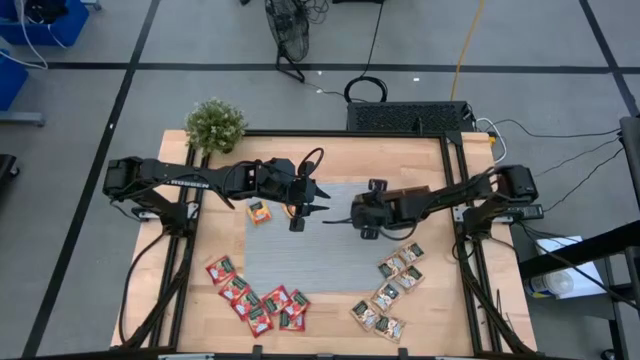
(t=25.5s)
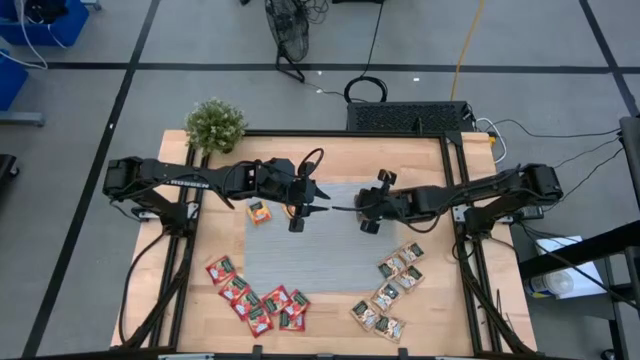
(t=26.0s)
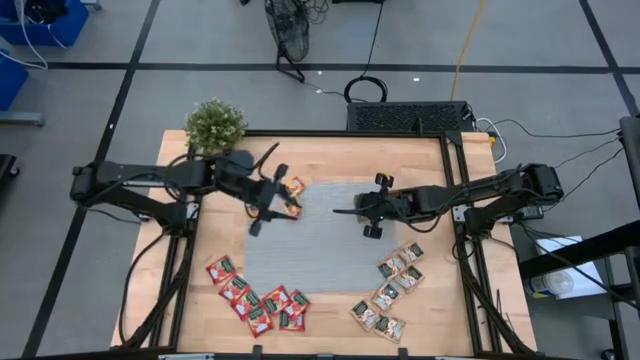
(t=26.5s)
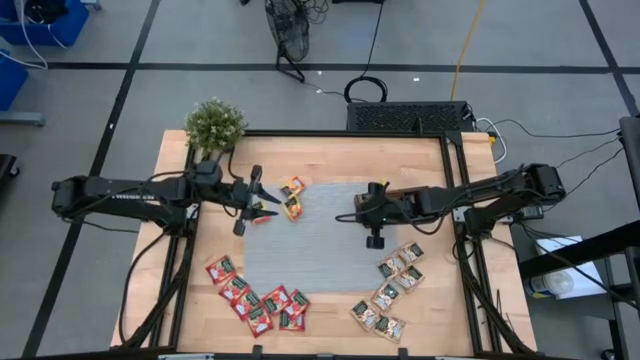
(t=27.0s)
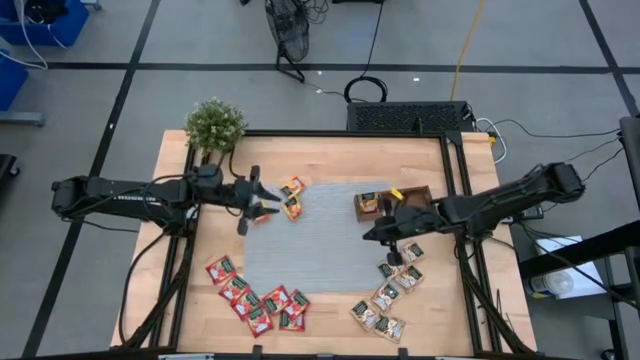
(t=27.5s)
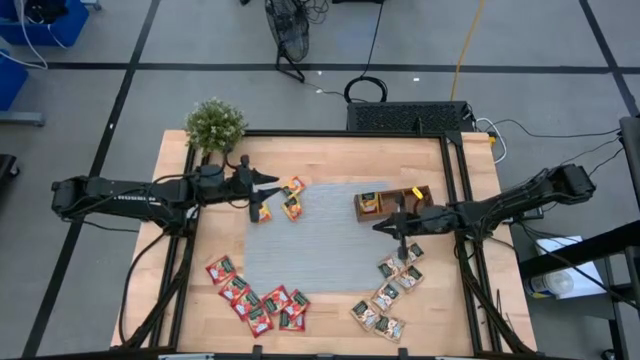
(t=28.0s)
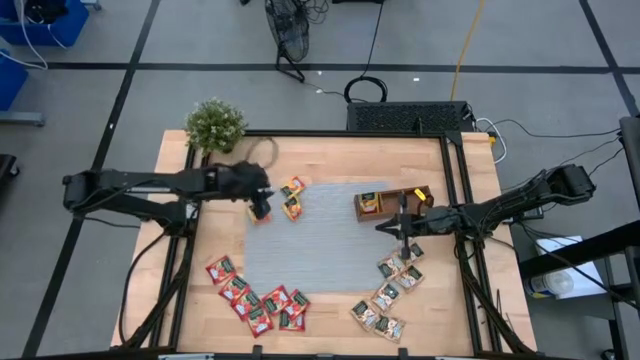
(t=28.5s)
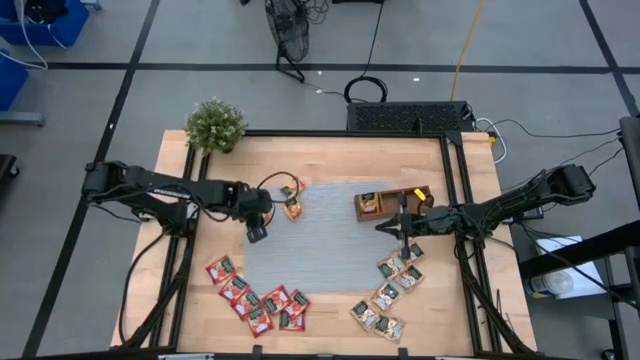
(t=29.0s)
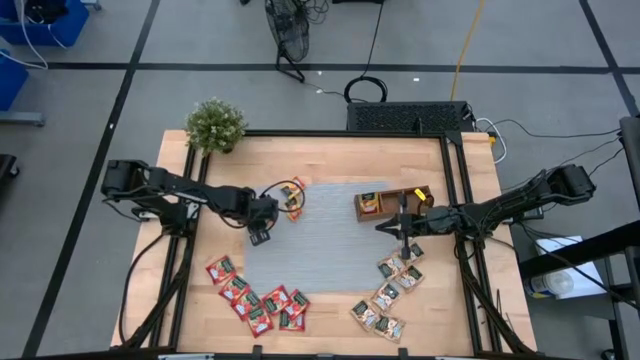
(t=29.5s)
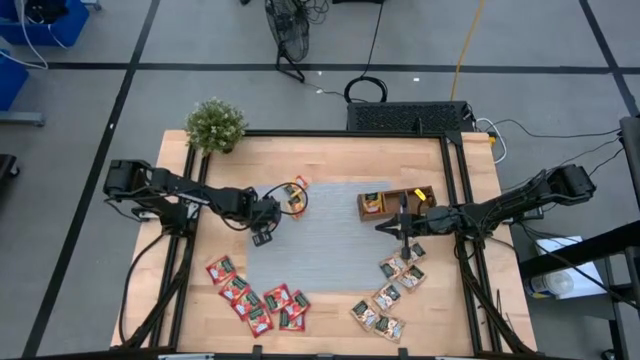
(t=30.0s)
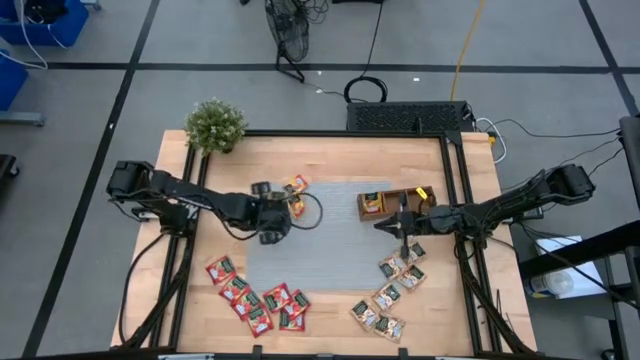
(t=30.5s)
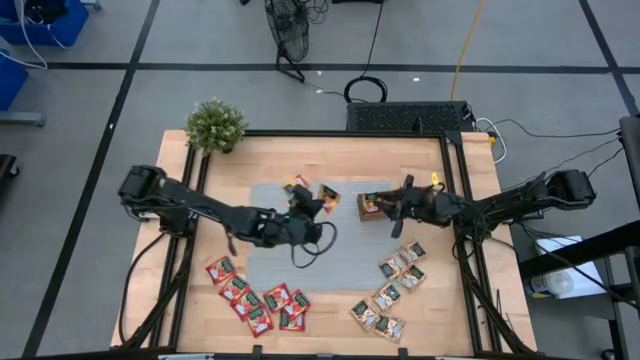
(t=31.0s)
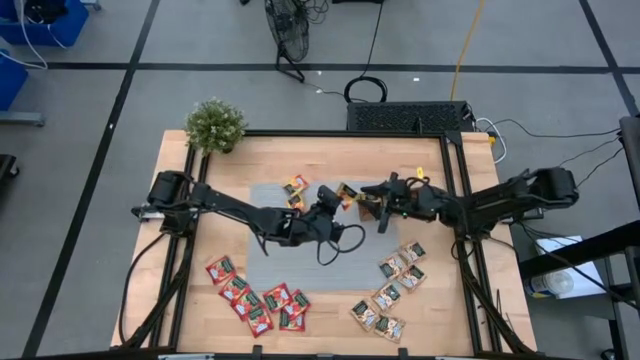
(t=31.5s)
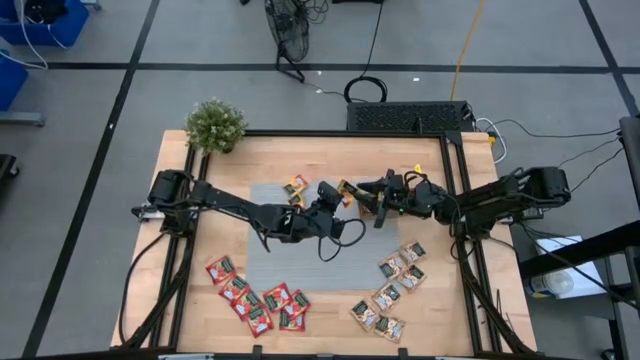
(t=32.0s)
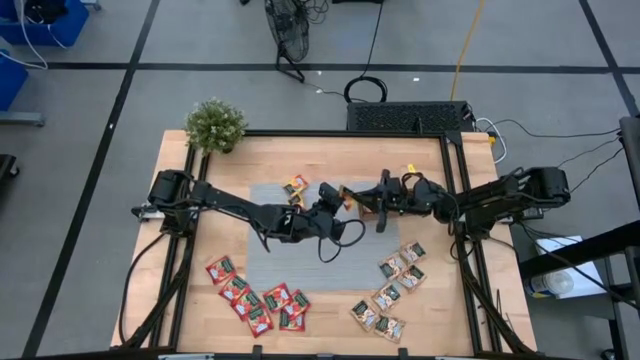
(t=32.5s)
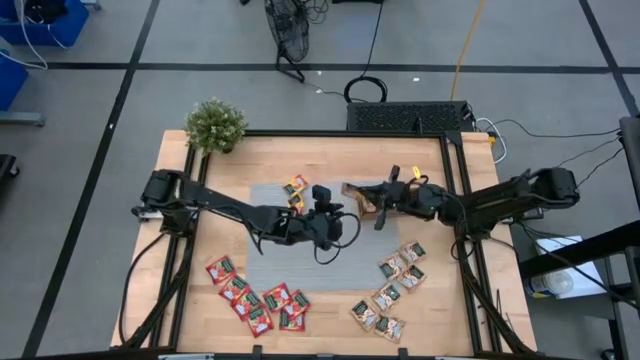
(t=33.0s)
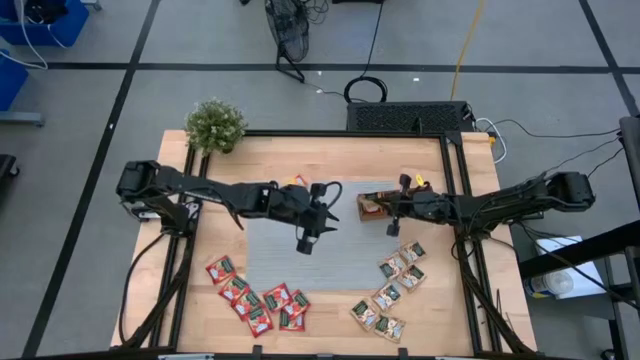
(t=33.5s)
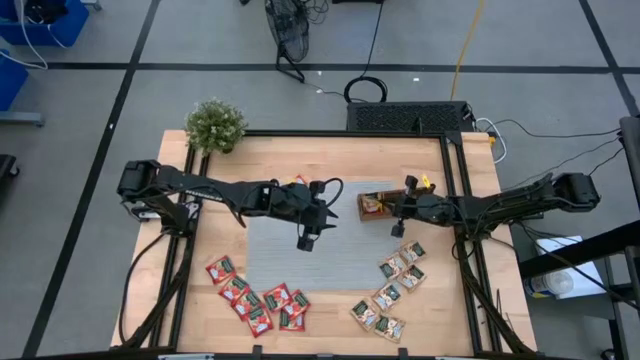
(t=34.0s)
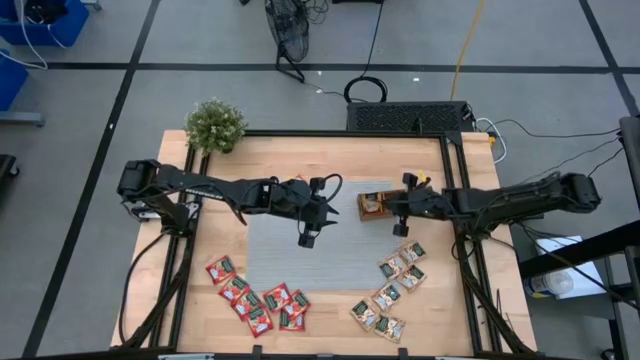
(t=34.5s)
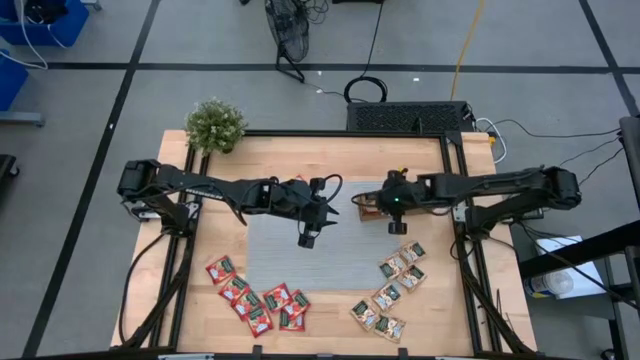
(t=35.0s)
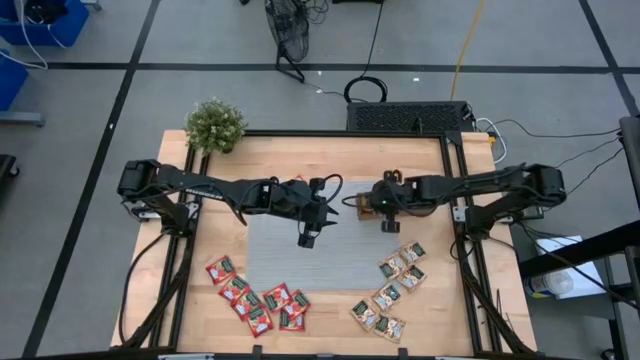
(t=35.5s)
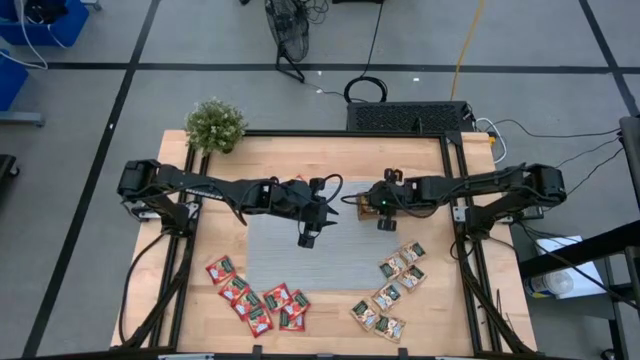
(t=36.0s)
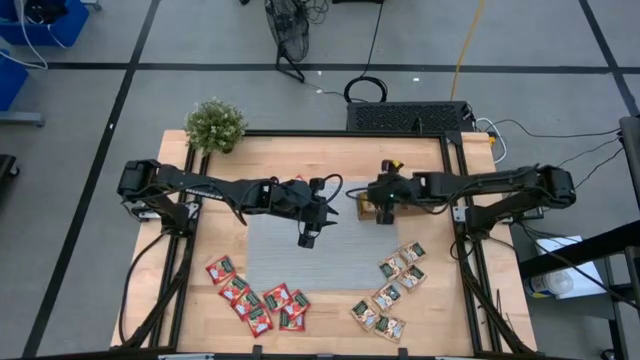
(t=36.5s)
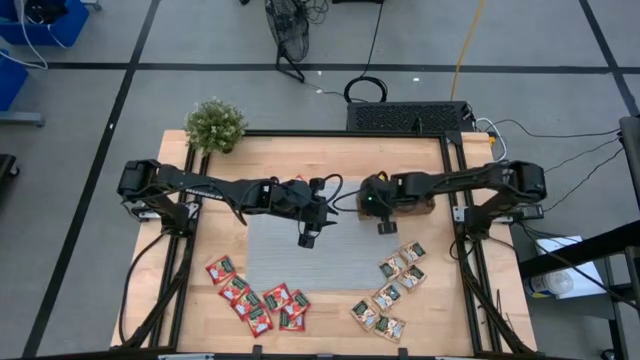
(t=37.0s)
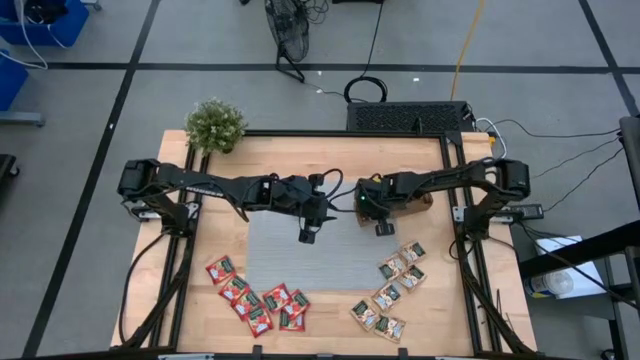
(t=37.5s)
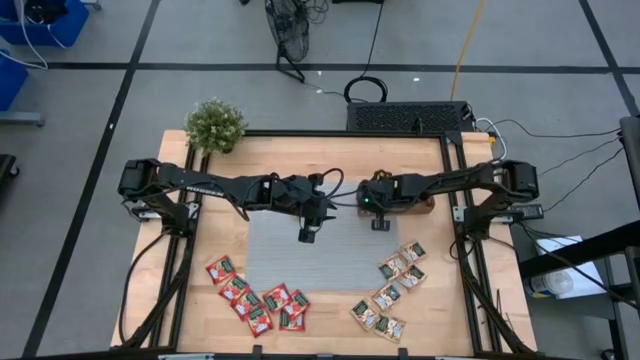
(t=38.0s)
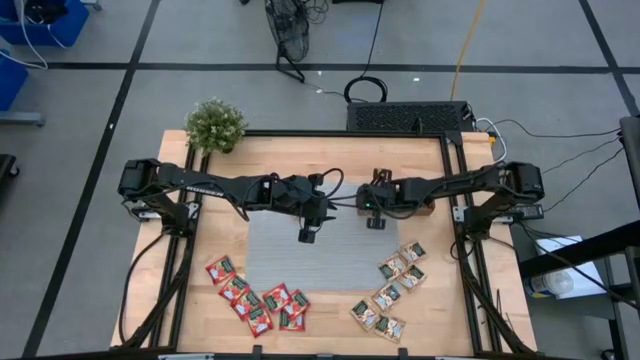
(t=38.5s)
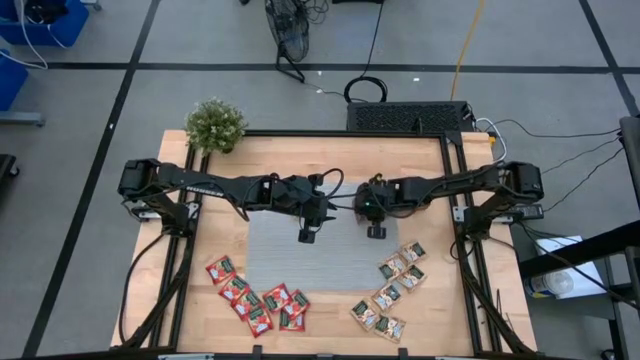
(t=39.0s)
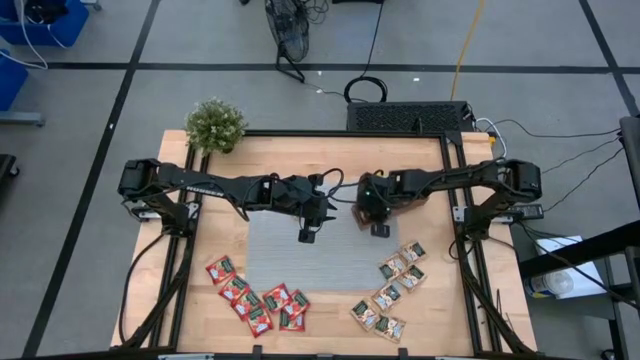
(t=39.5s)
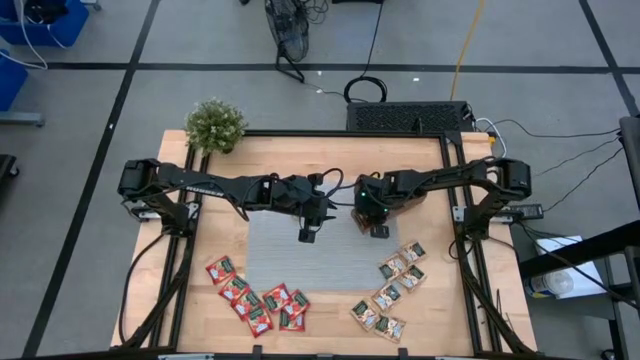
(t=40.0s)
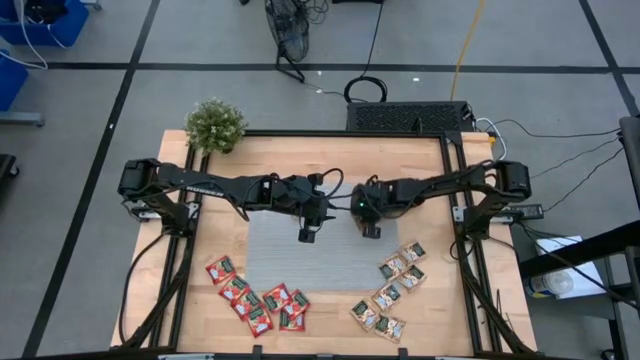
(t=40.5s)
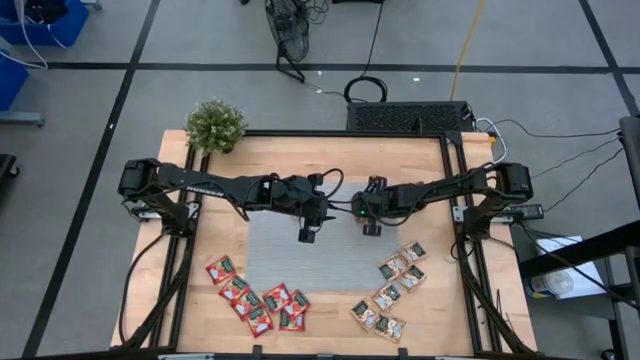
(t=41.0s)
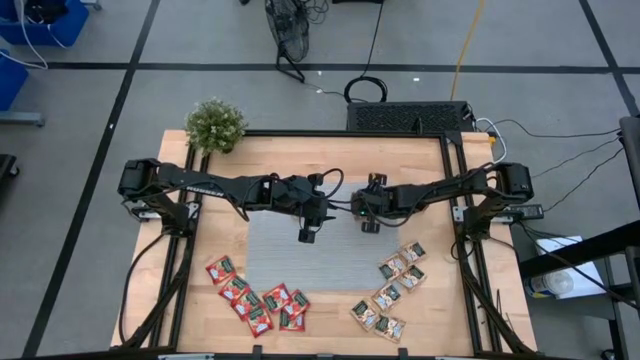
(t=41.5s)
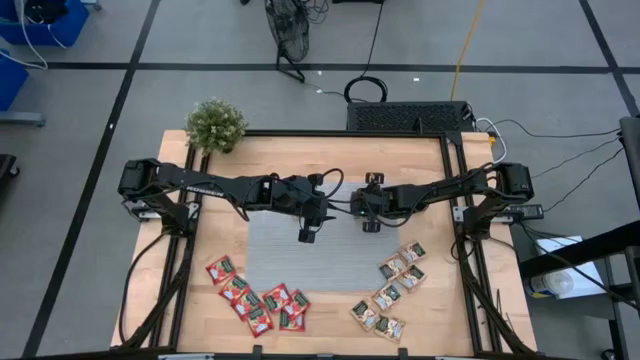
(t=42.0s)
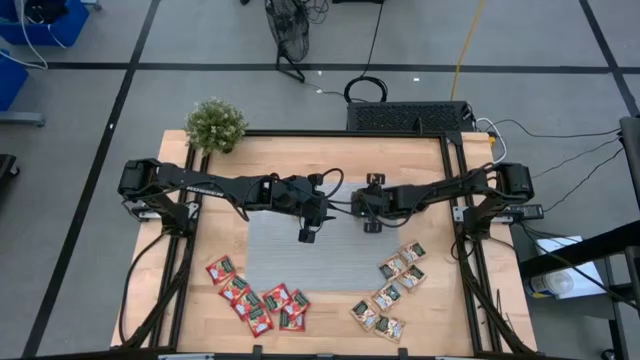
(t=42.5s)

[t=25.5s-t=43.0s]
Task: Pick & Place Tea
Put the yellow tea bag into the left section of the wooden organizer
